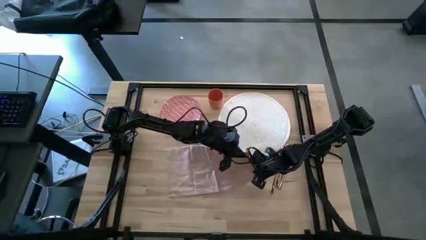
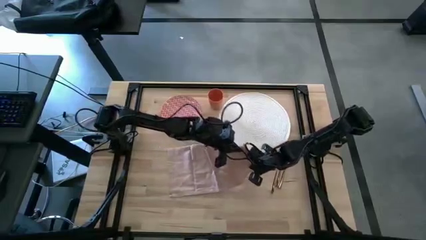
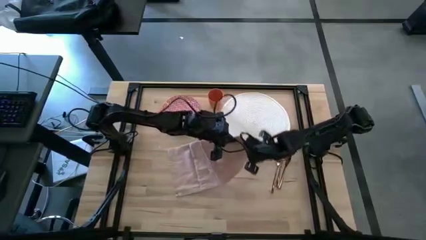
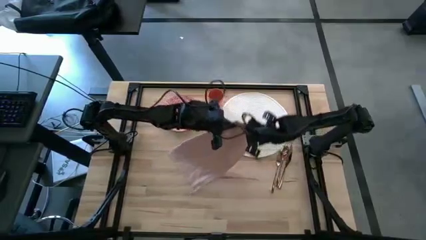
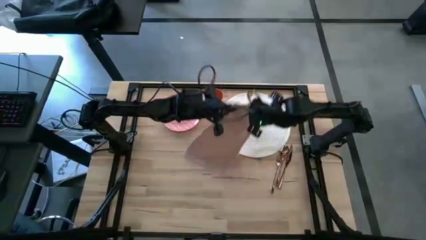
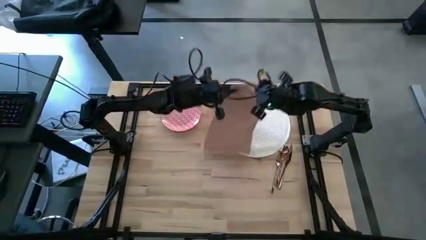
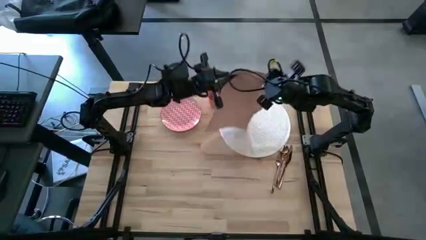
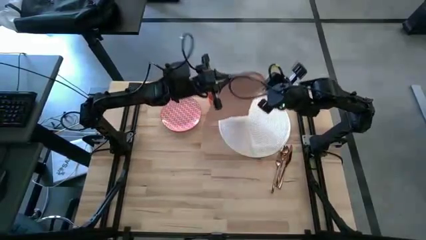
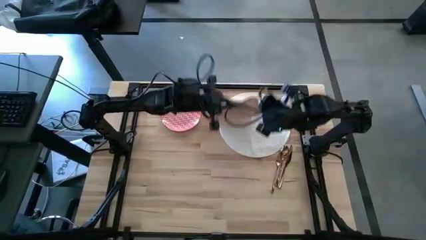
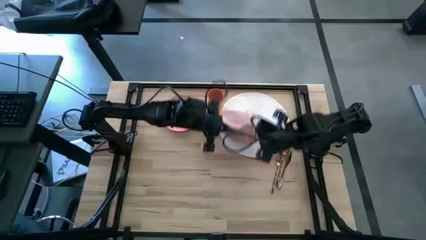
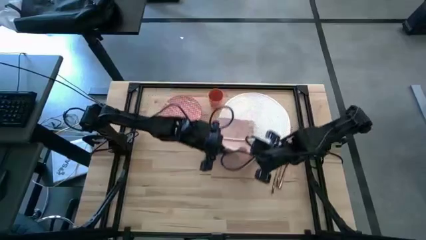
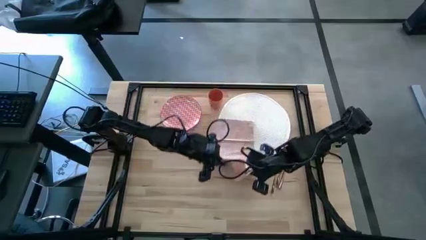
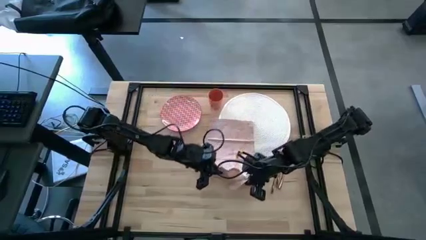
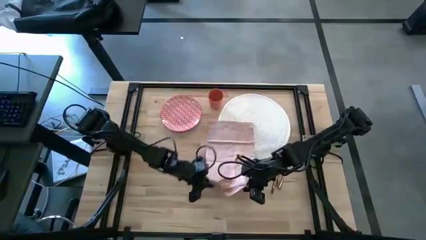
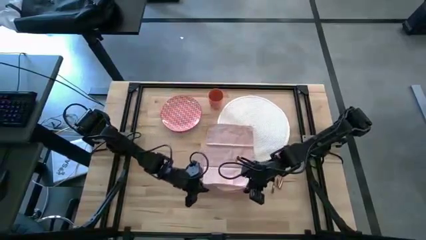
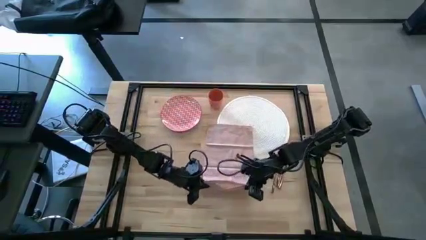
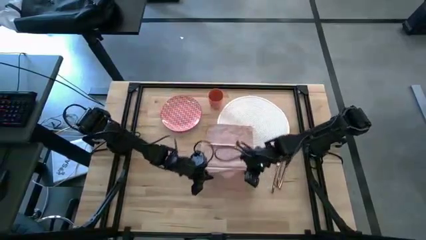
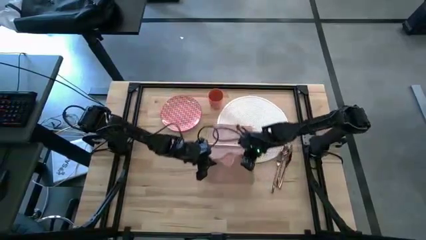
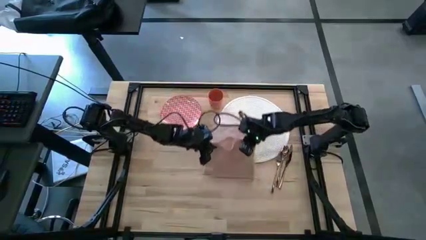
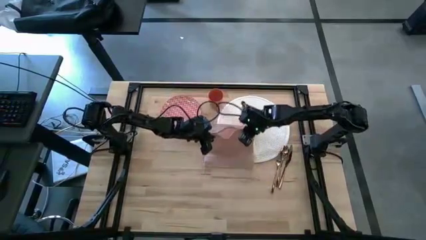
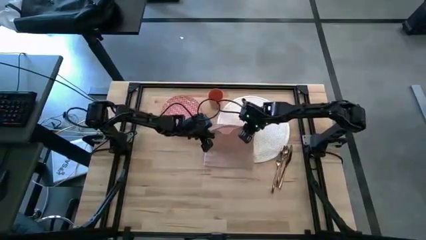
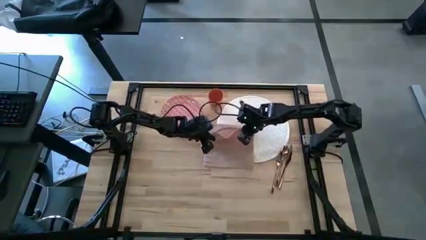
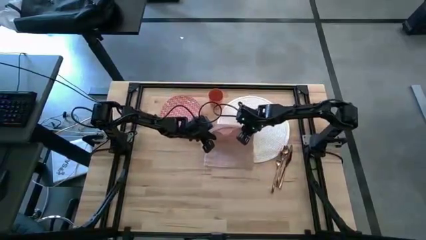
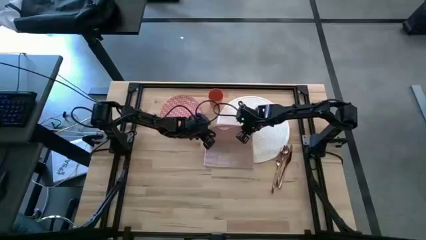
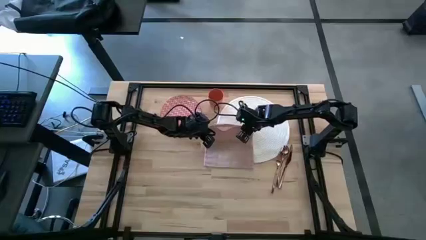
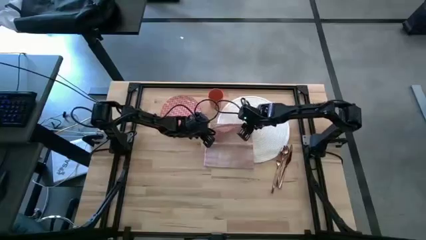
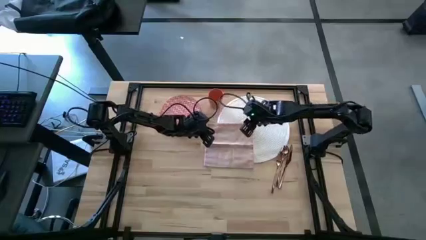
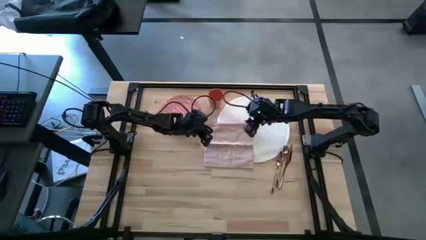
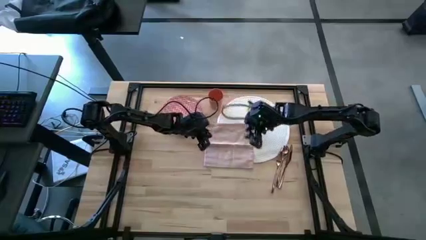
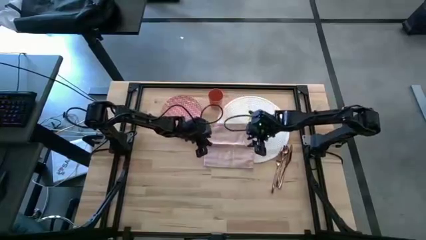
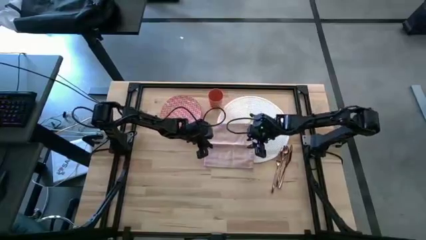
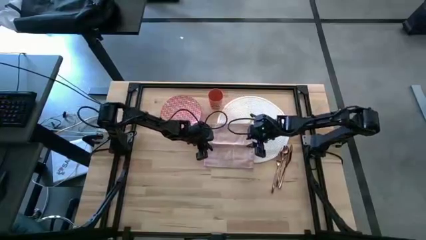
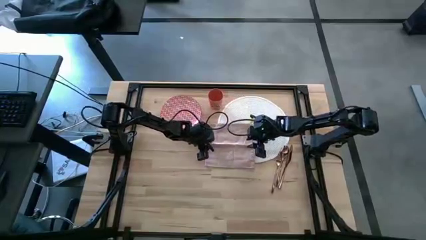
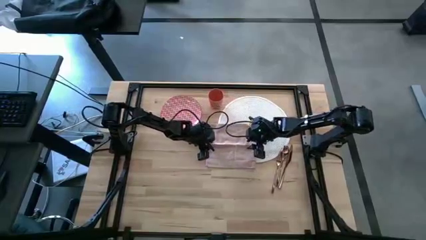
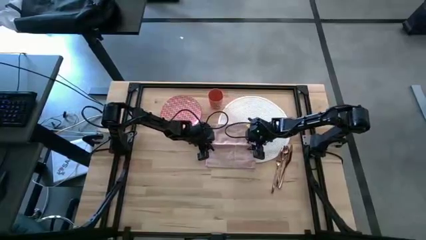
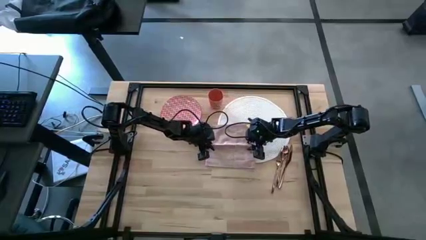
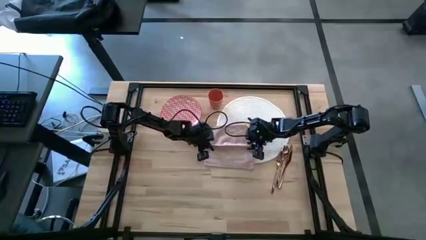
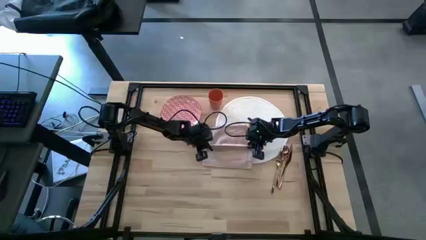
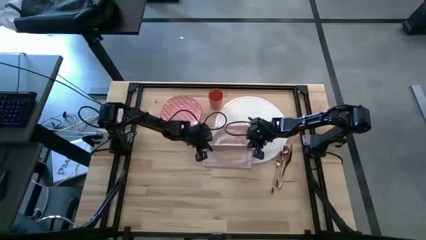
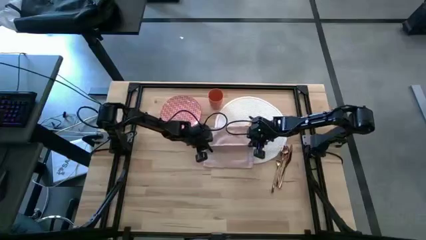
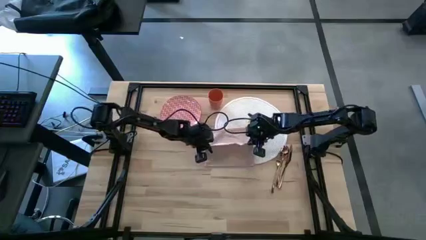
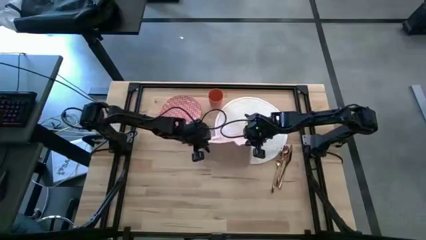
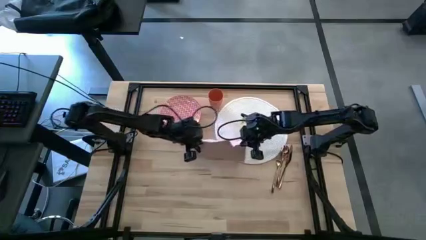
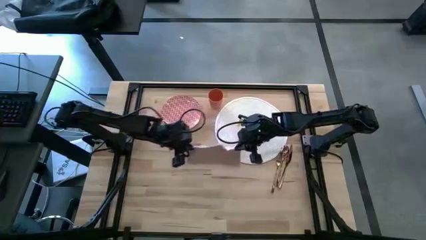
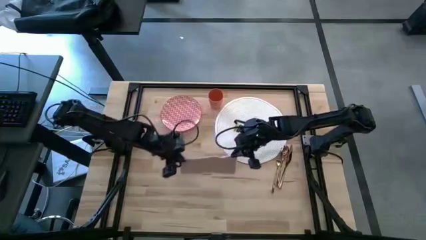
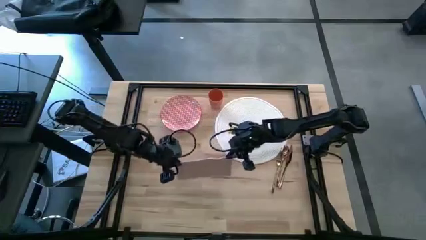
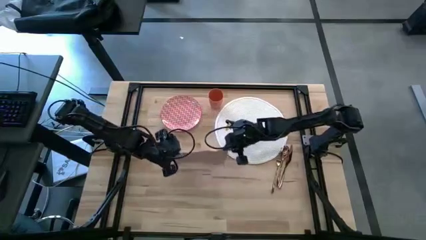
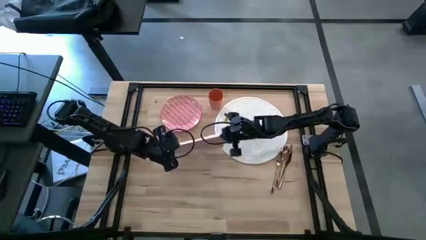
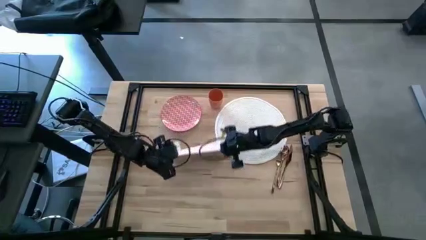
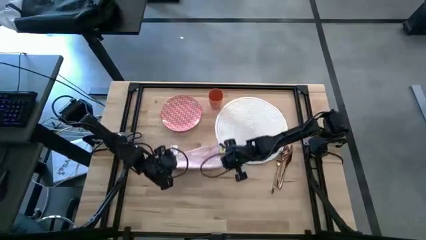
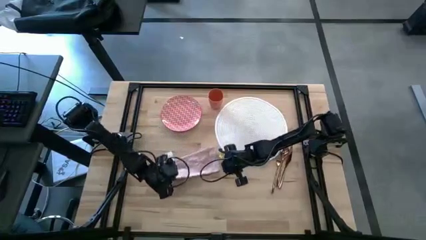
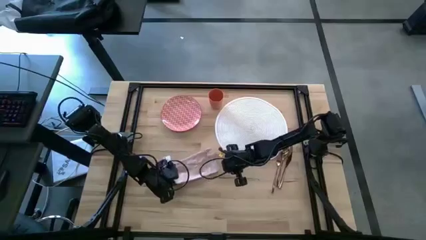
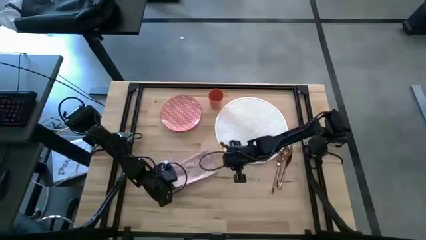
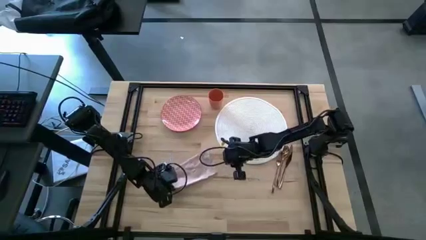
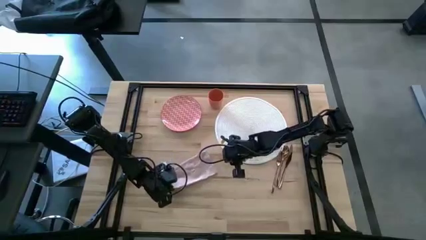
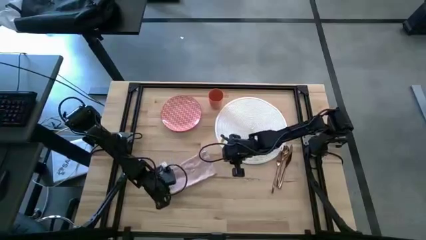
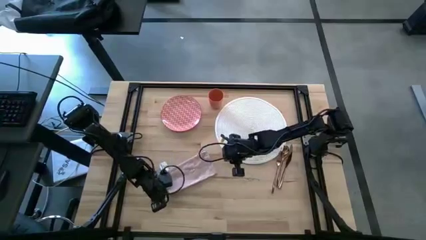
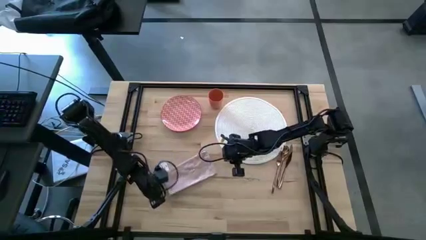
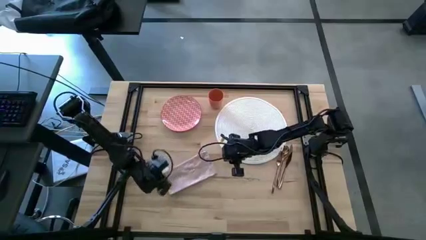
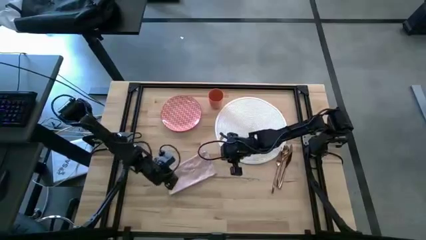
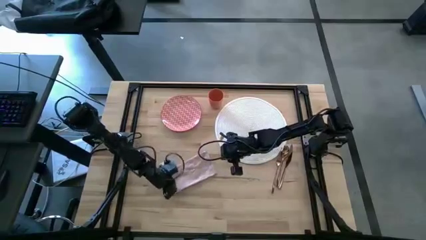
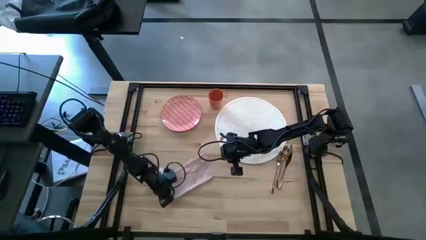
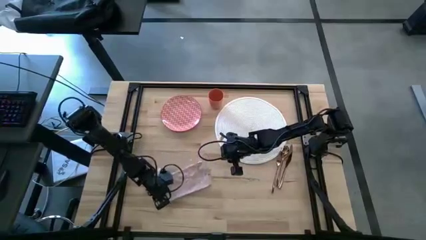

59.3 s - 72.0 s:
Task: Set table place
Fold the pink napkin

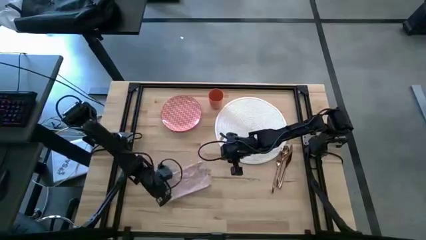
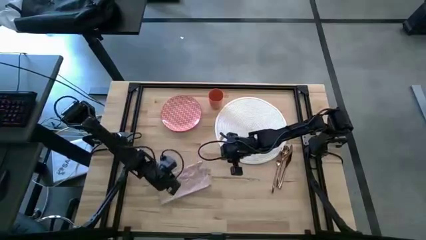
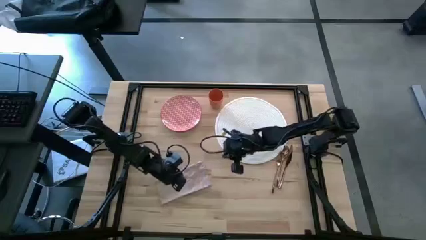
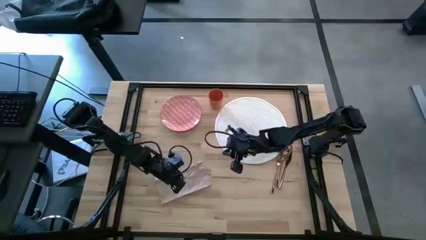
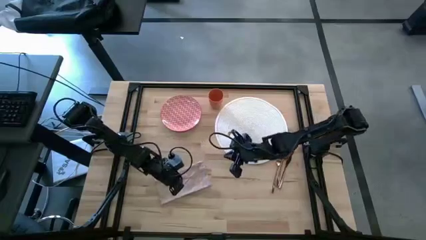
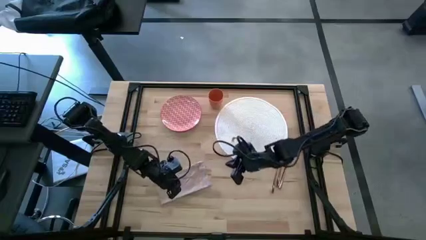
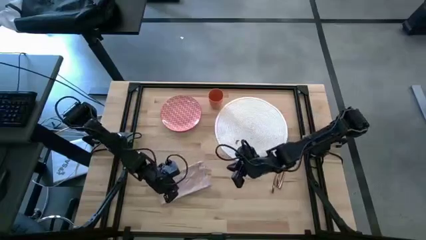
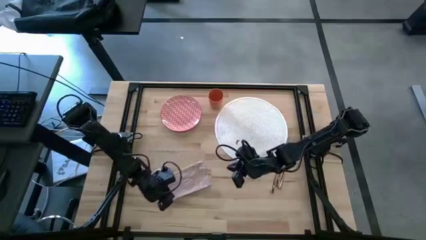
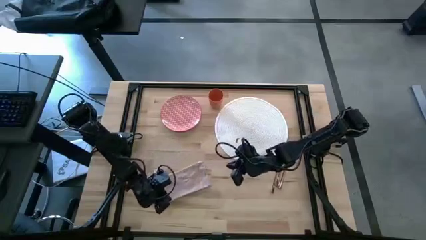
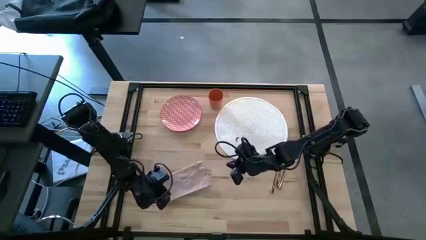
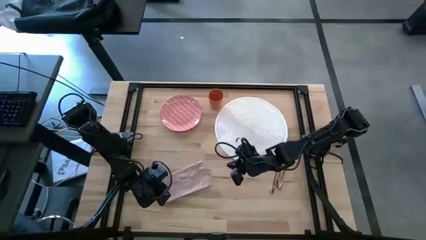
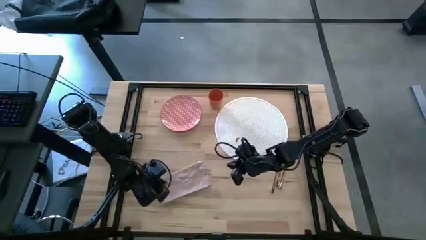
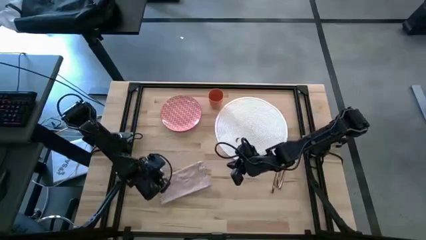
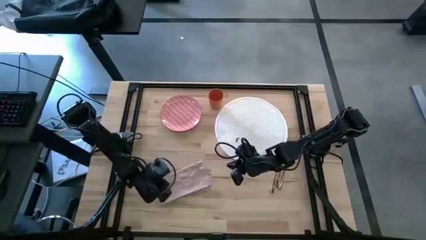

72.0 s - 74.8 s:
Fold the pink napkin

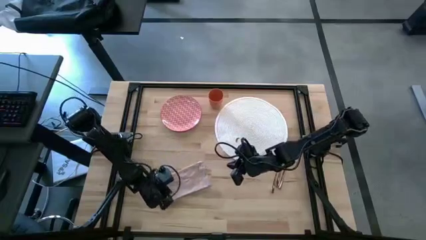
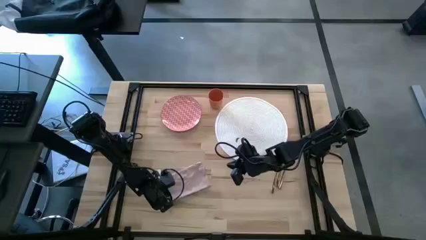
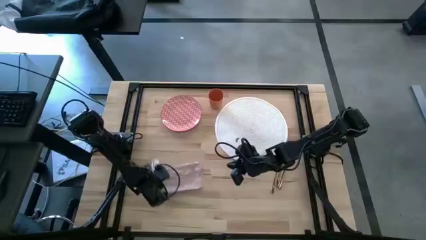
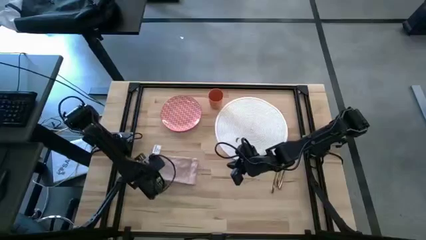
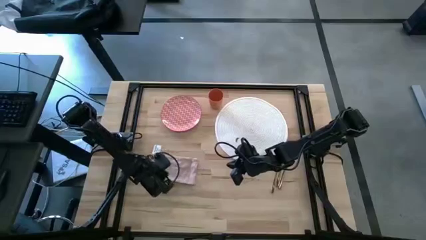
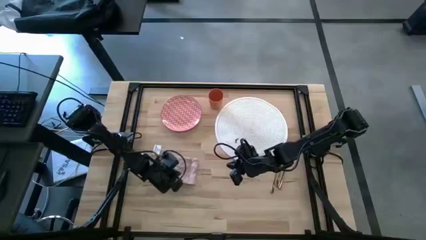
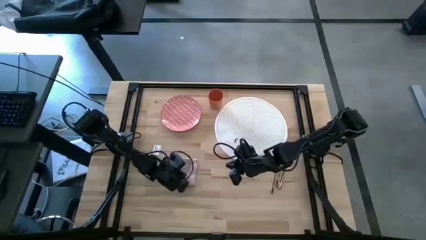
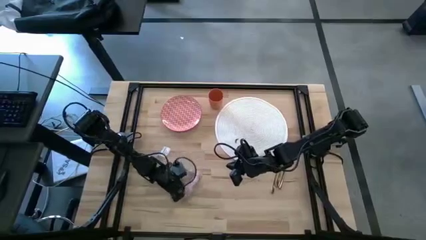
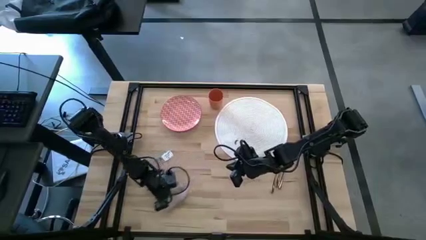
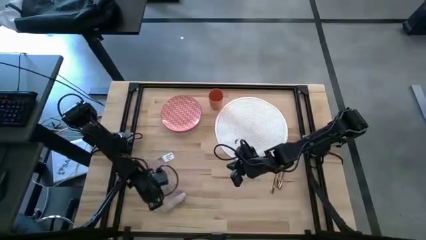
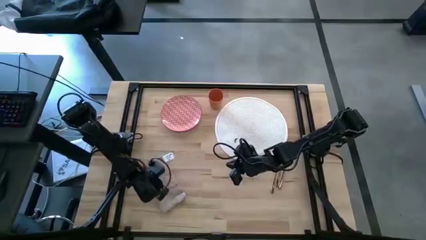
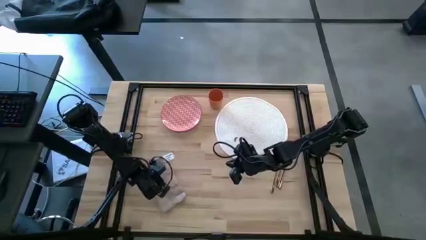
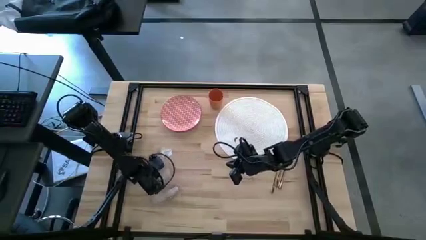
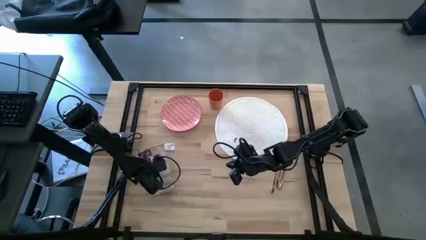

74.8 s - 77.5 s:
Fold the pink napkin
